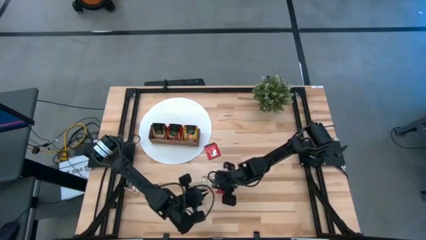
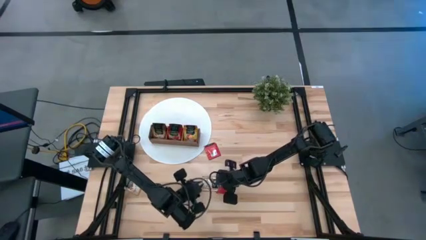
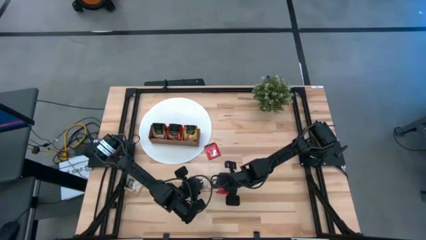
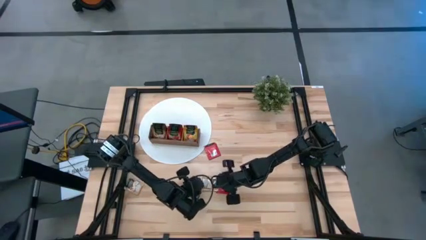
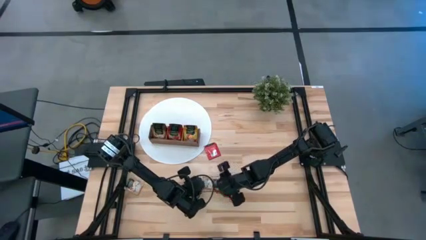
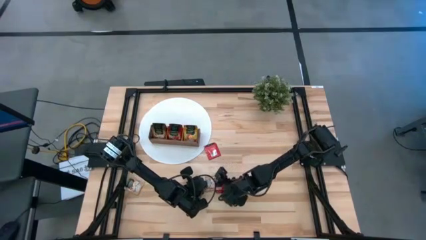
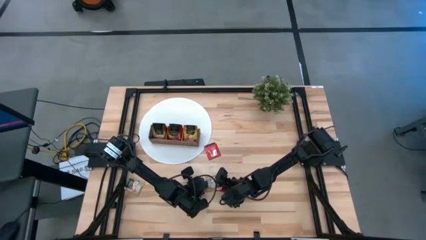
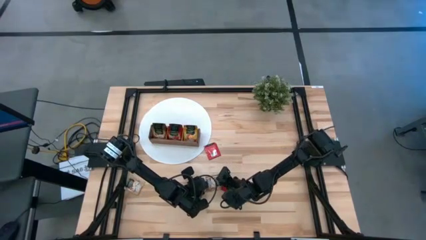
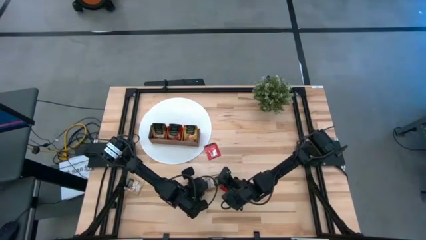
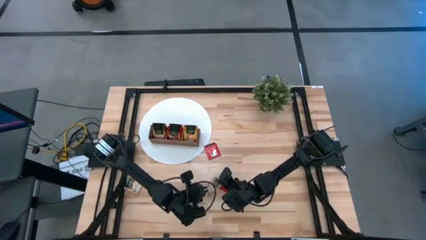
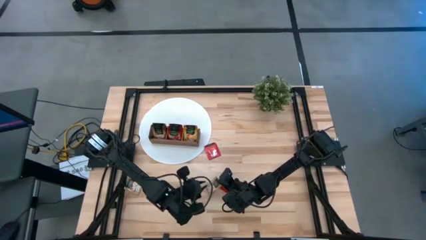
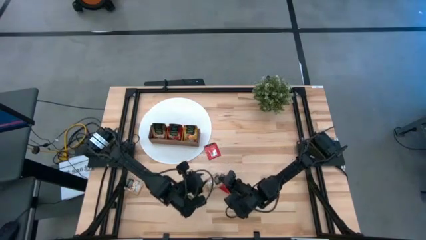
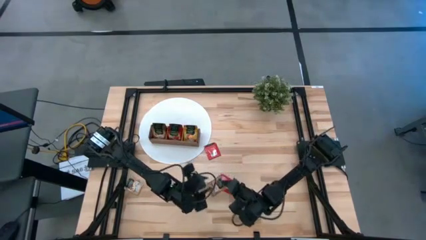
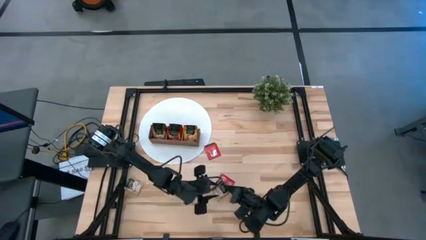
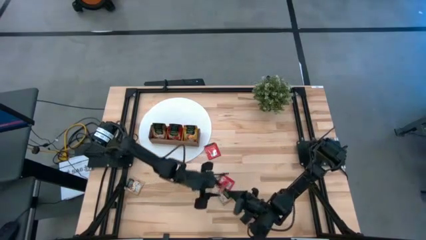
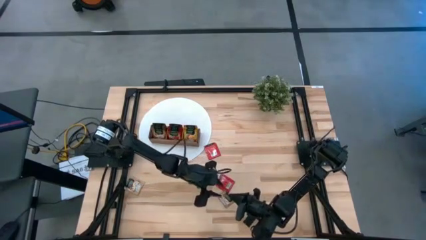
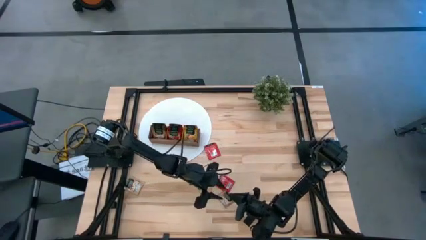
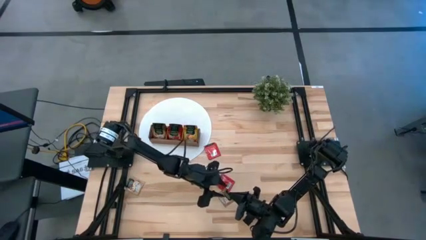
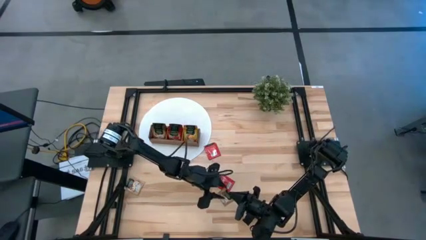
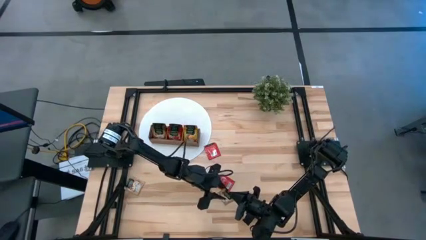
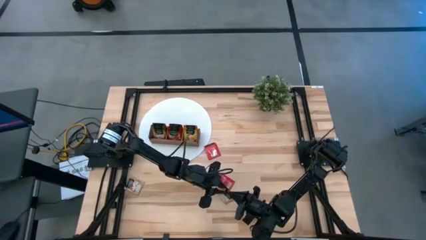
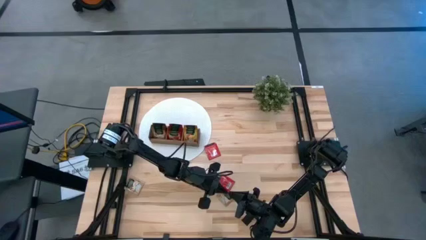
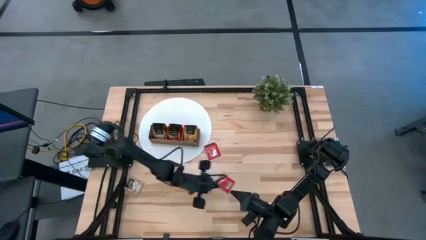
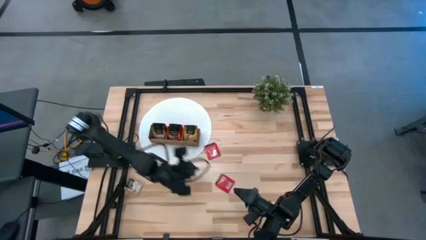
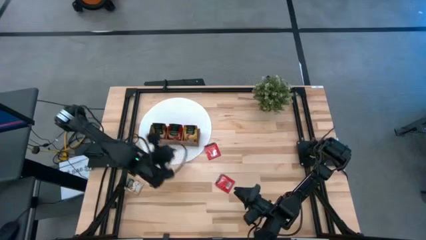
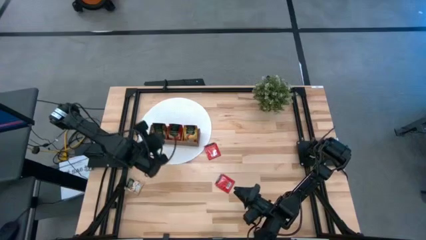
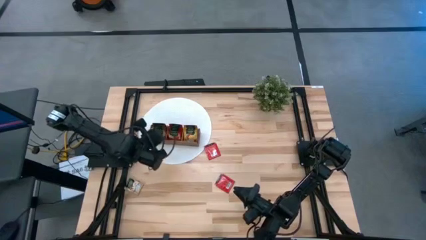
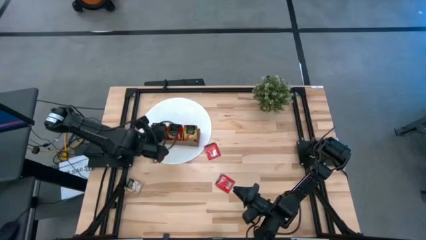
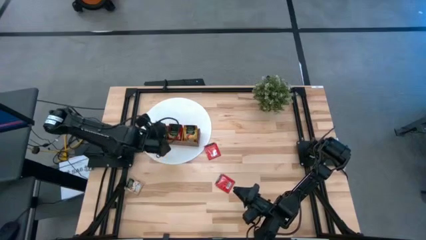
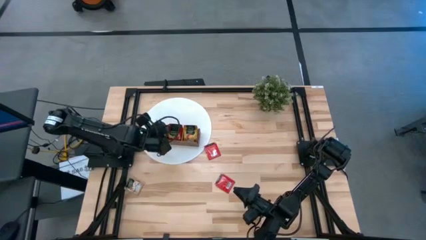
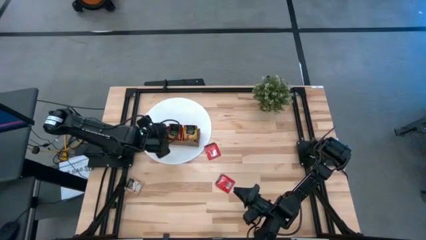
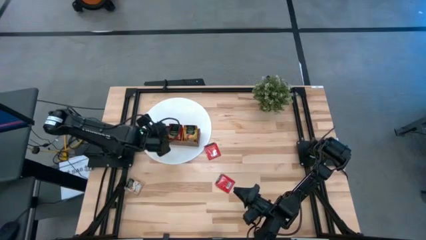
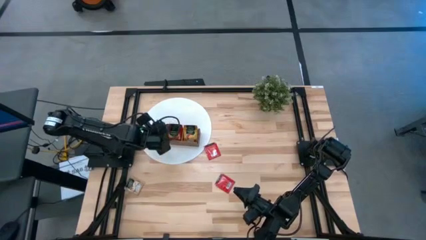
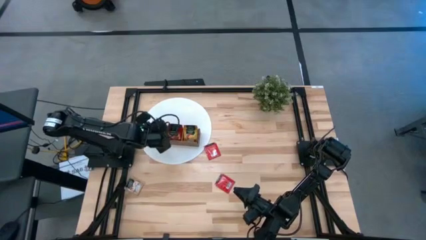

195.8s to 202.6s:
Task: Pick & Place Tea
Put the brown tea bag into the left section of the wooden organizer

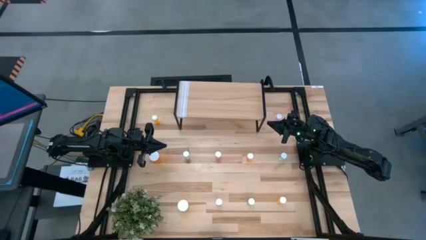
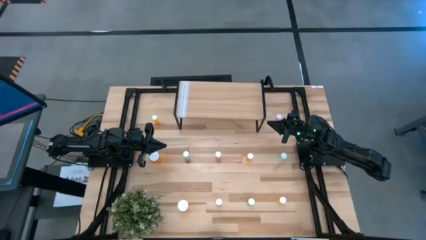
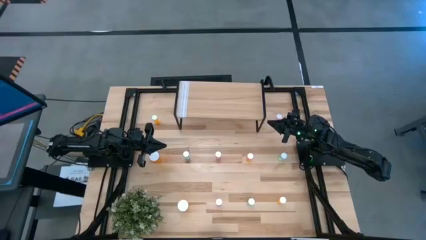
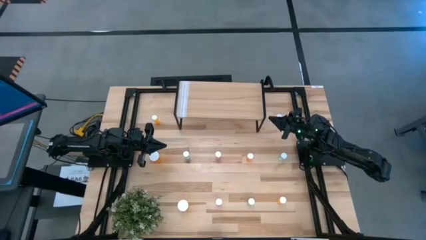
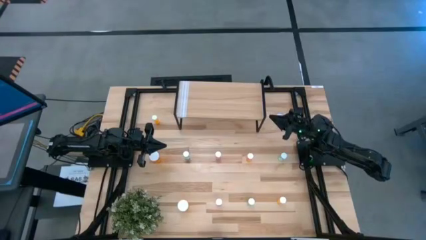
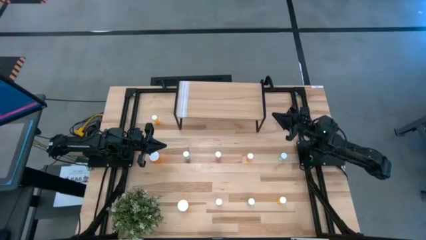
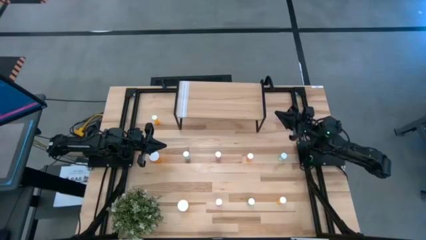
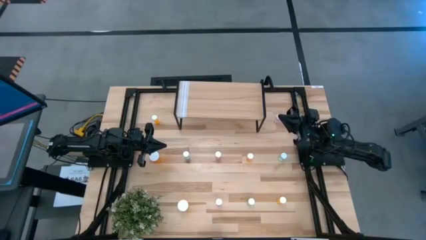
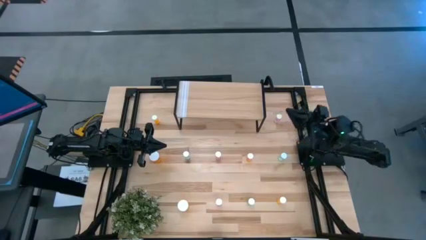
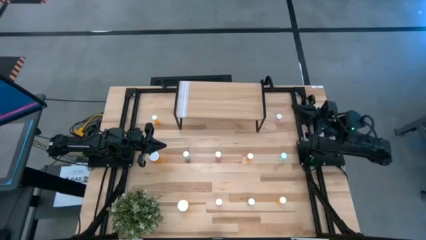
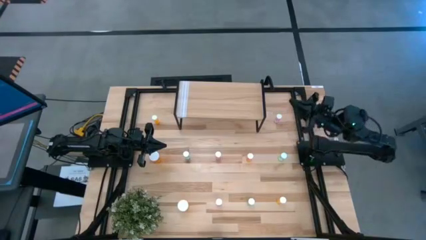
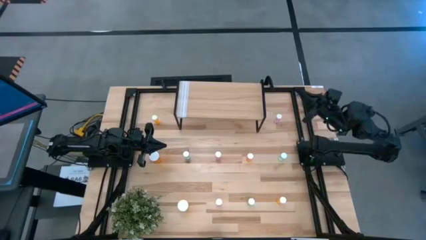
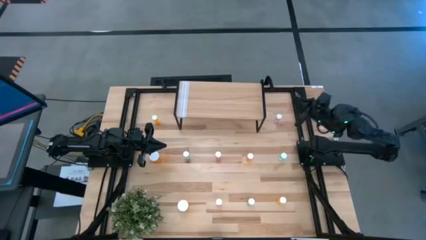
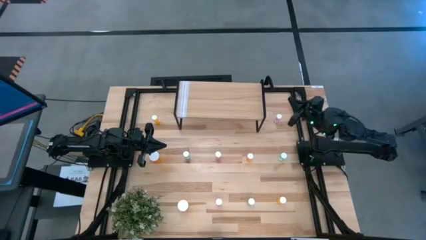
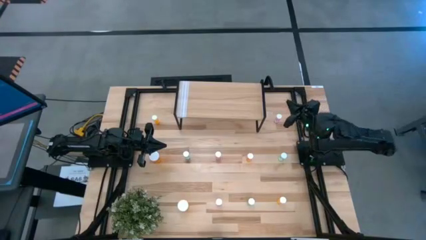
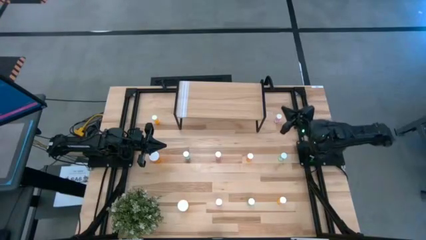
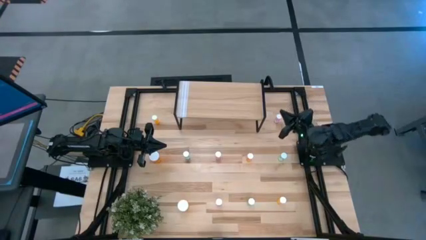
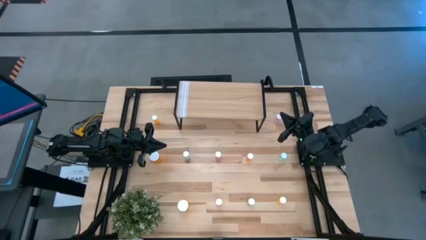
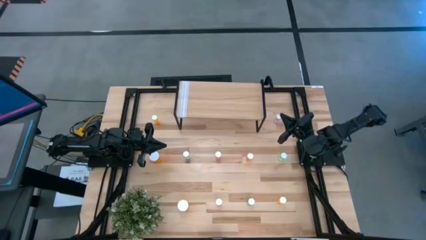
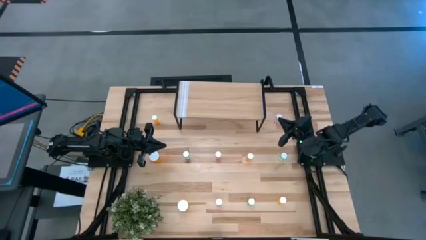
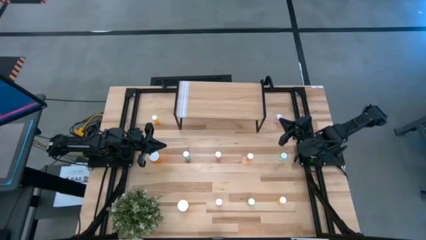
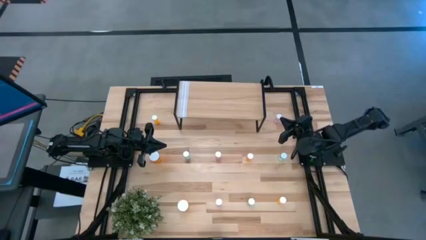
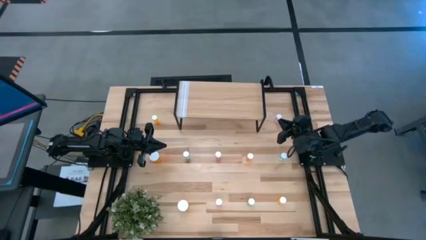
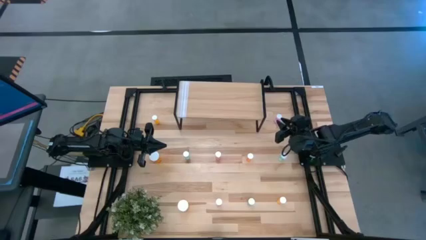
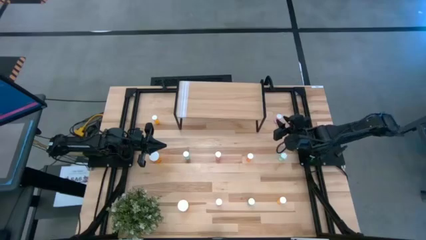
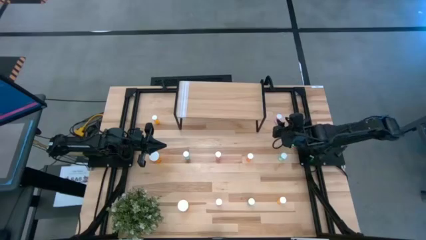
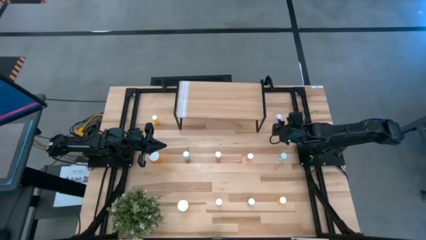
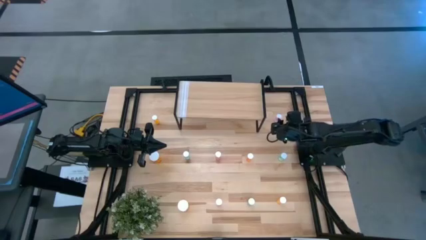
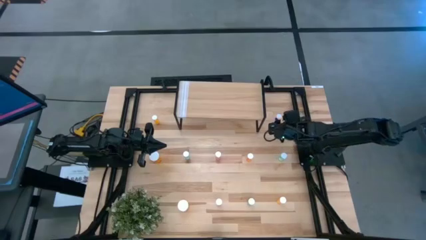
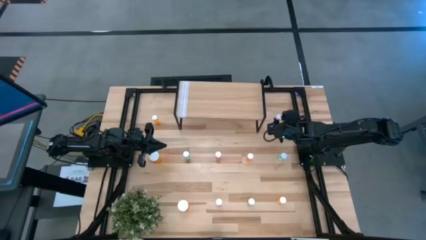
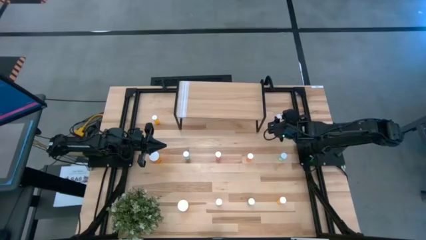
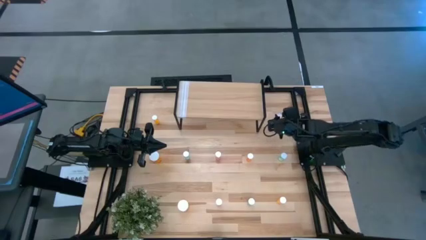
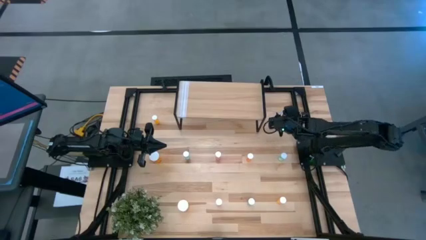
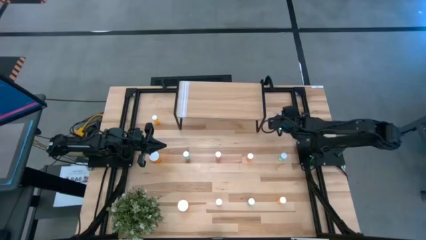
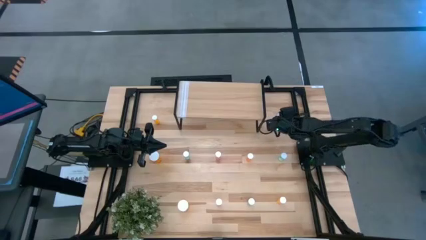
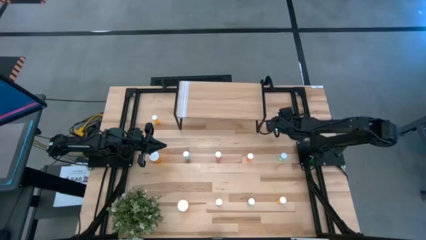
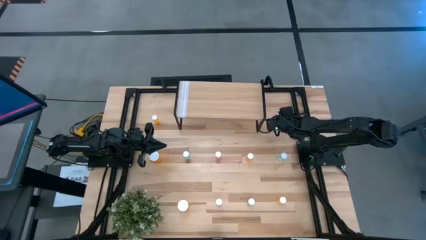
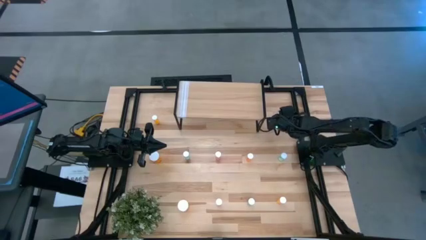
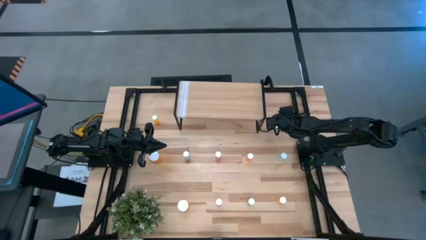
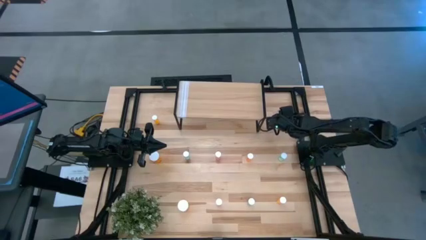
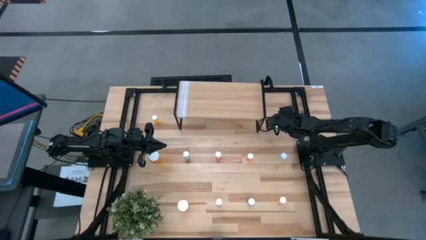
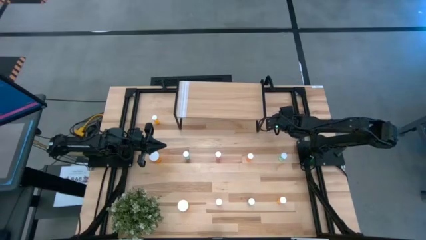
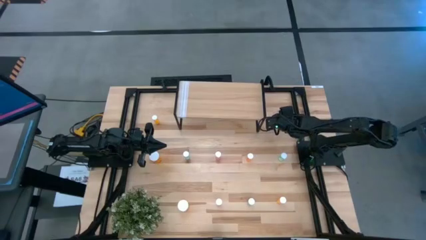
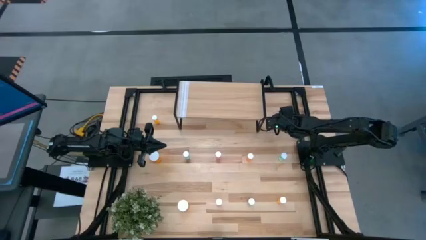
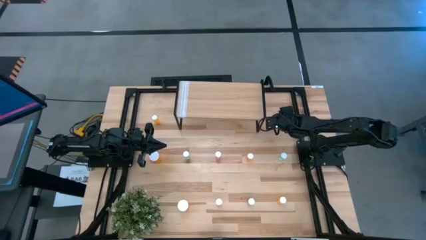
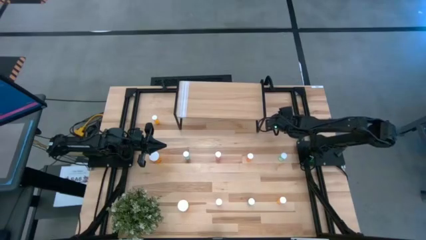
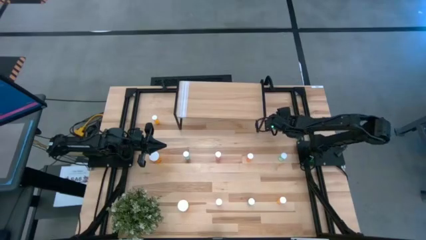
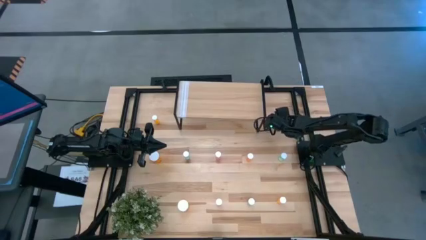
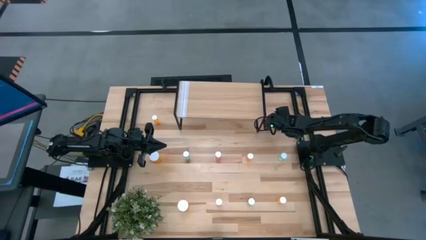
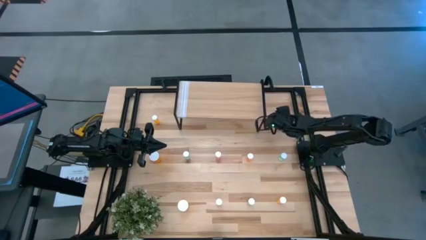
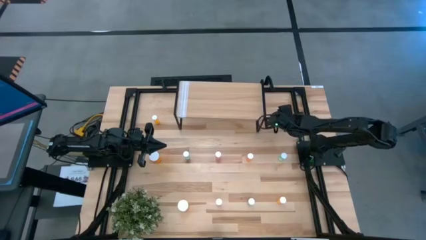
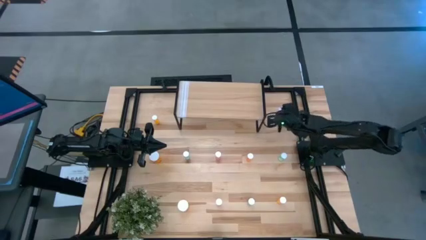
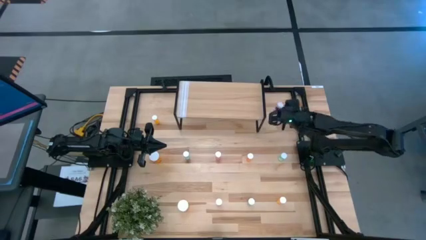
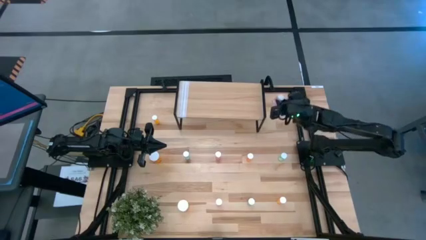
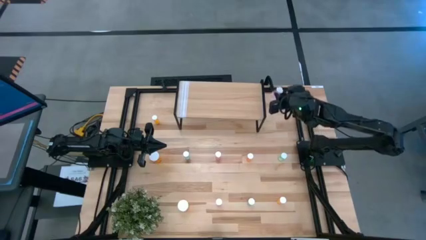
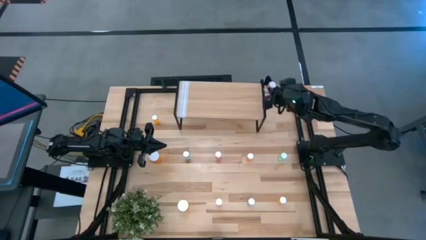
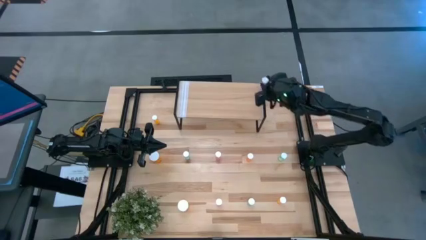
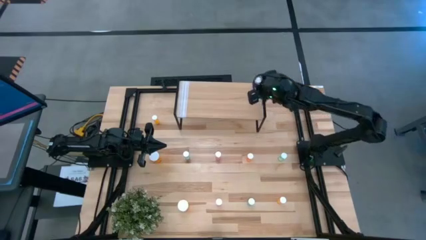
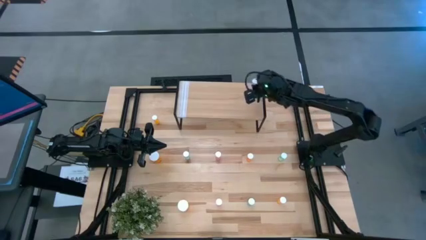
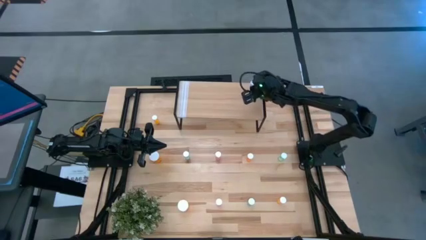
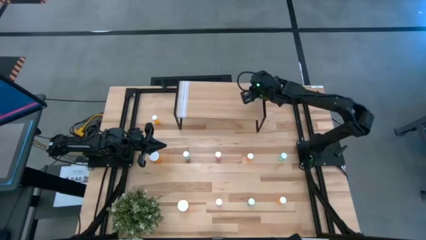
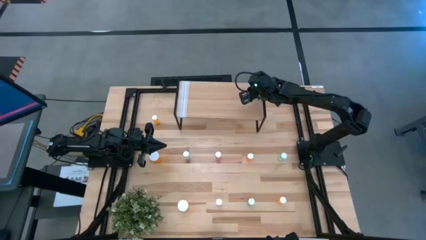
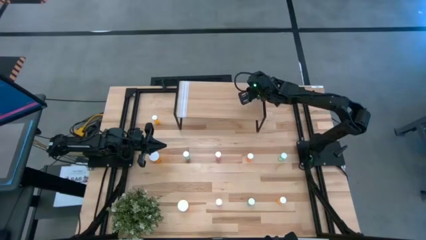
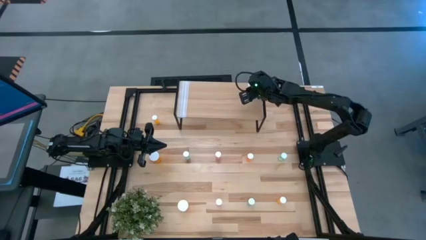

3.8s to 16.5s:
Task: Pick and place medicine bottles onto shelf by color
Put the top right pink small pill bottle on the shelf
